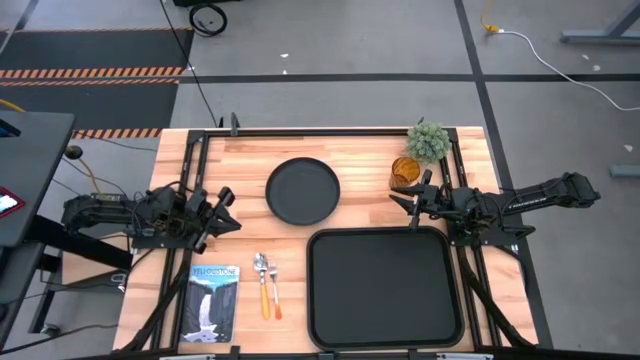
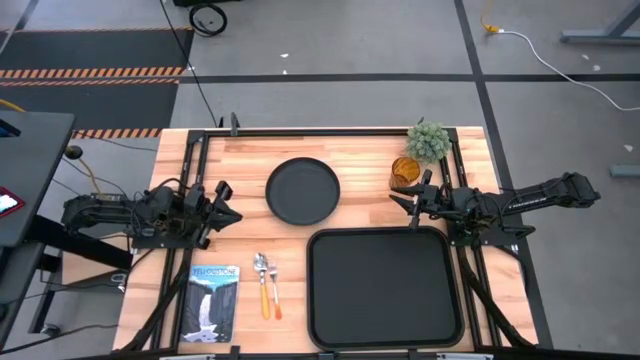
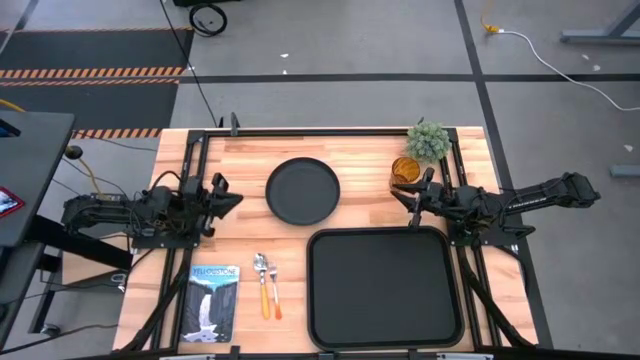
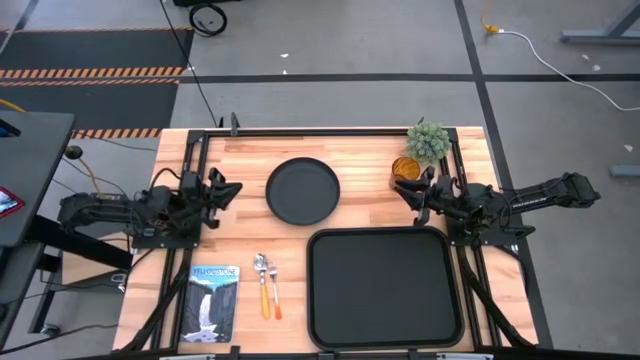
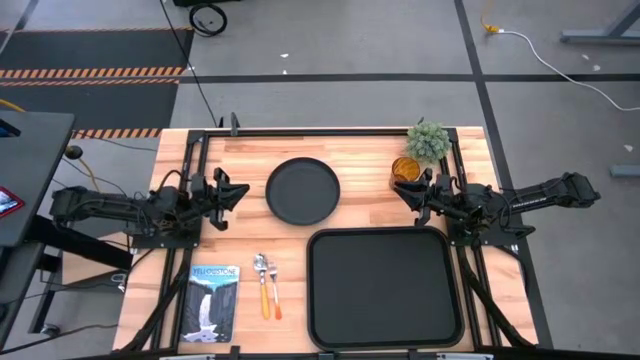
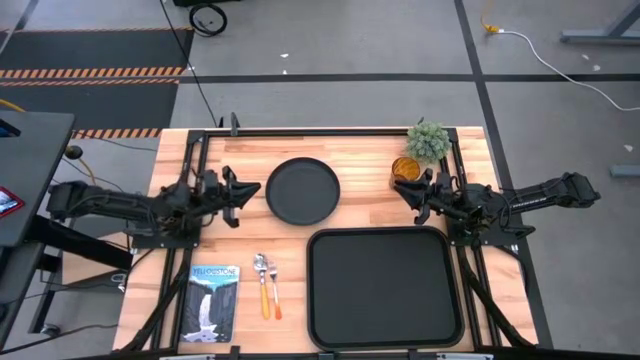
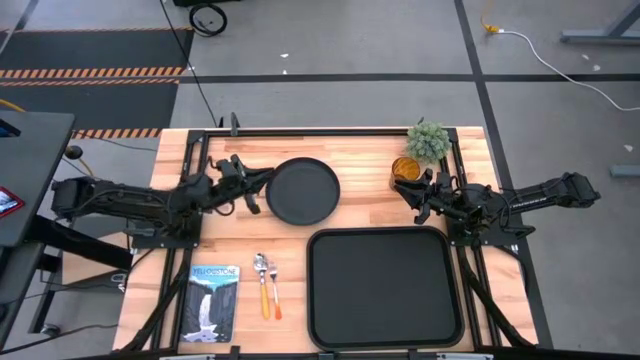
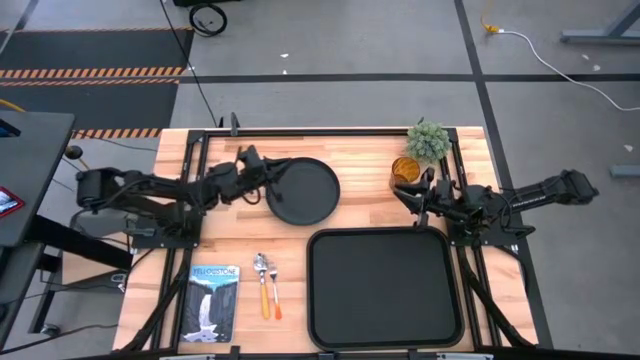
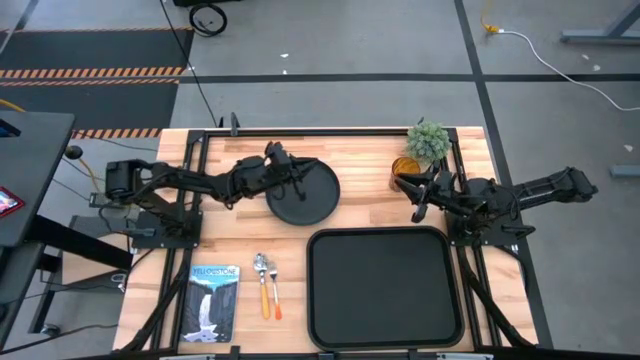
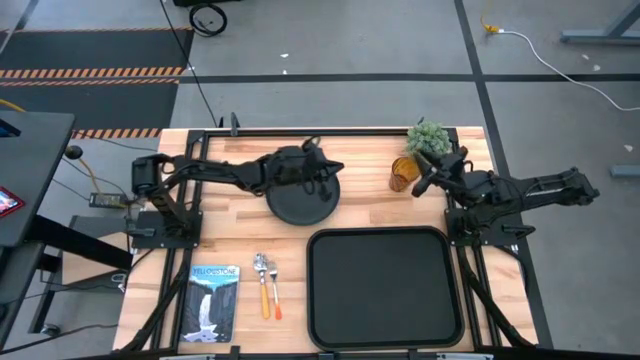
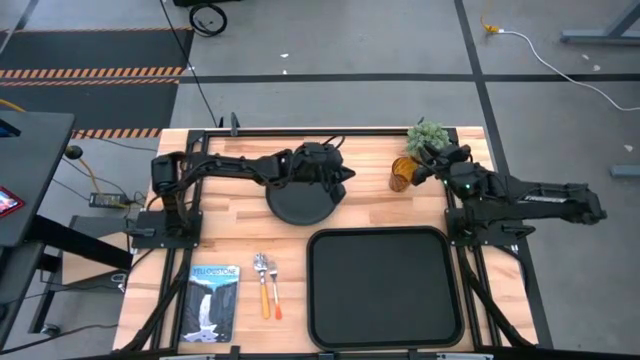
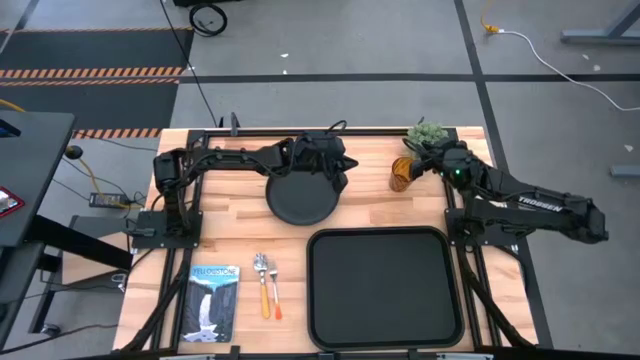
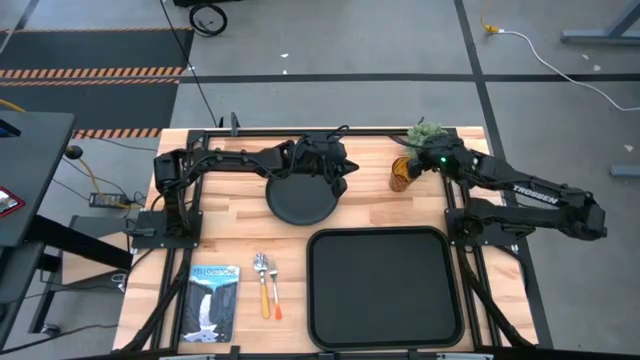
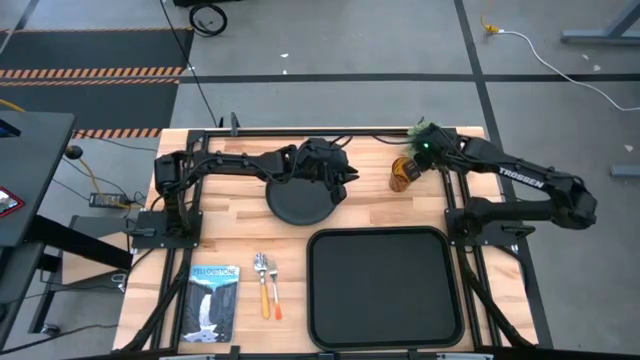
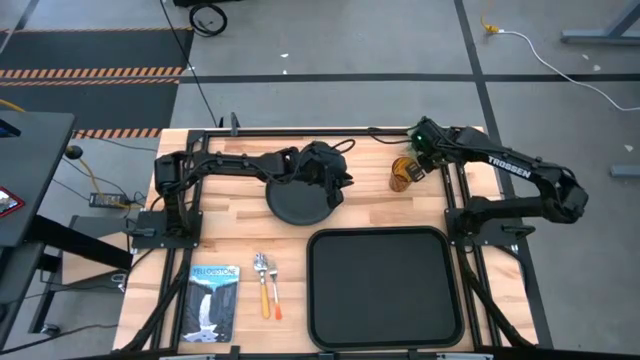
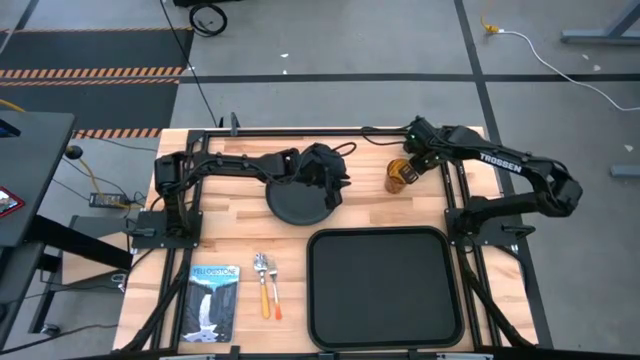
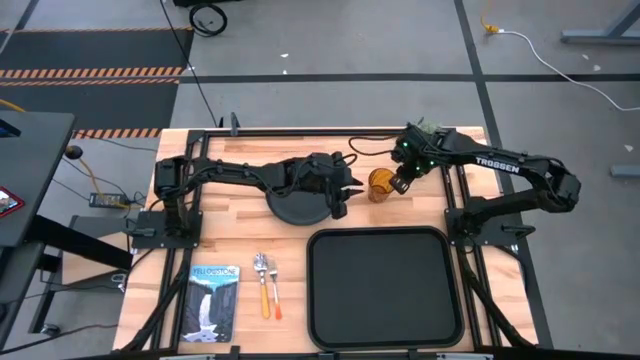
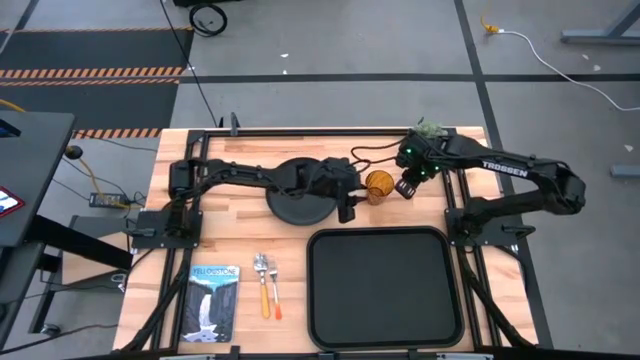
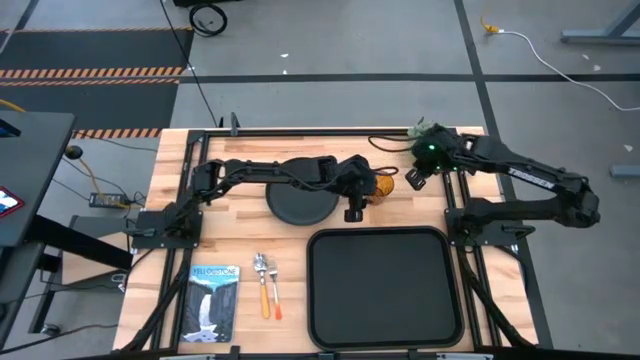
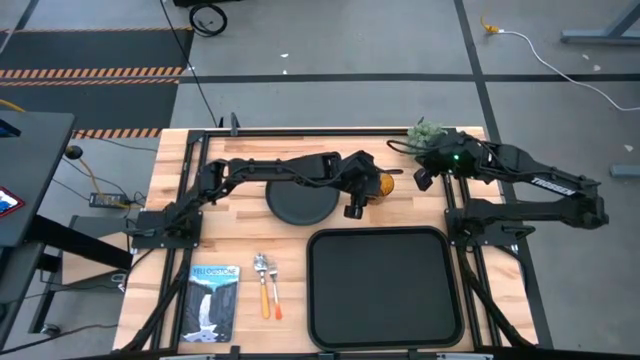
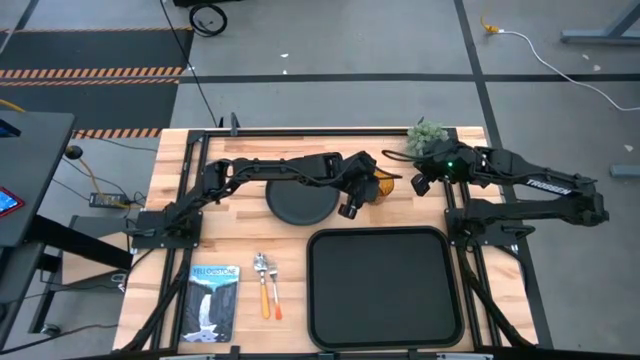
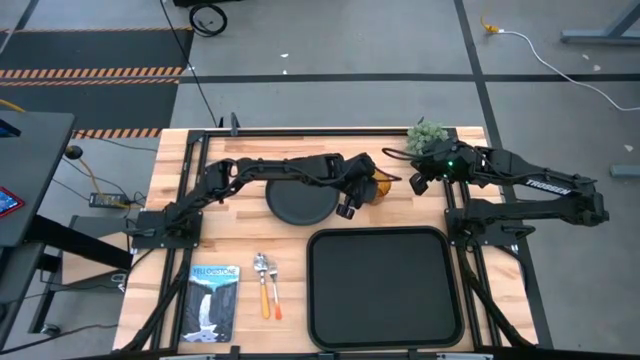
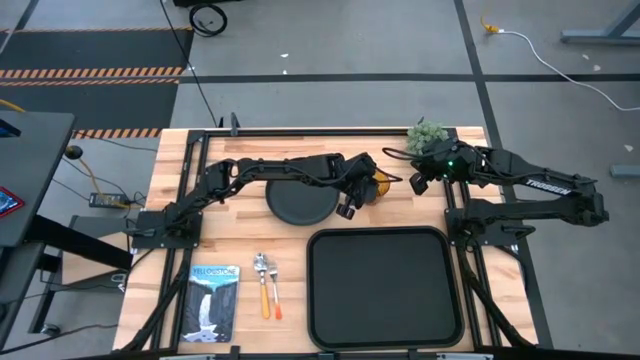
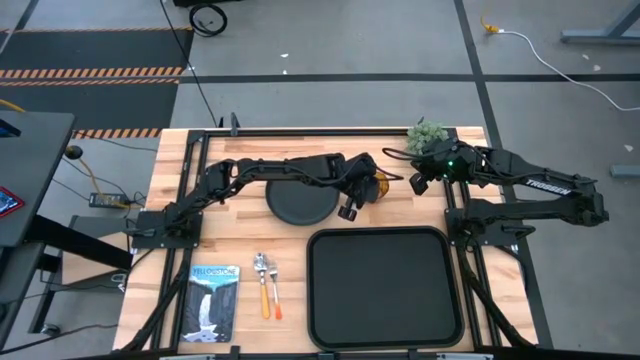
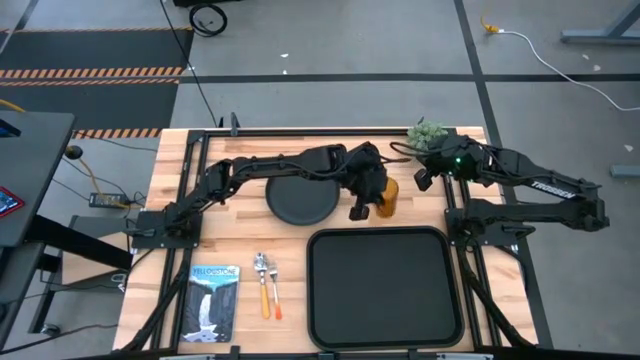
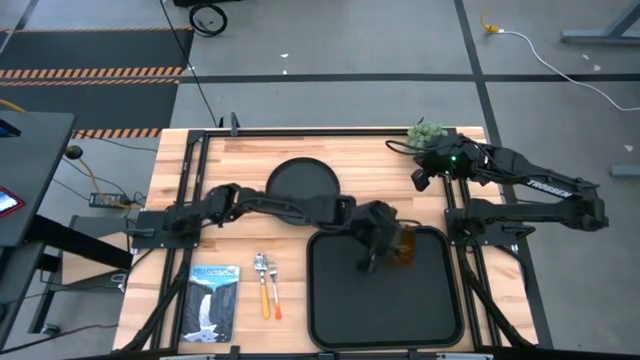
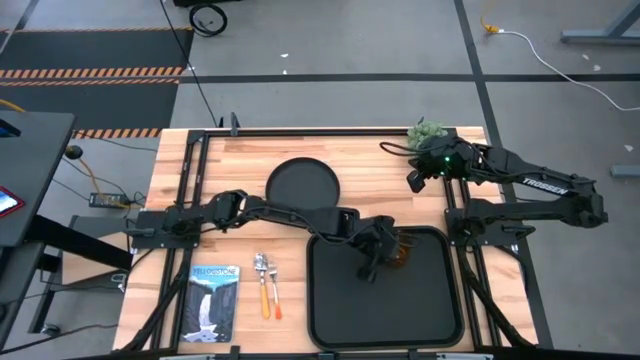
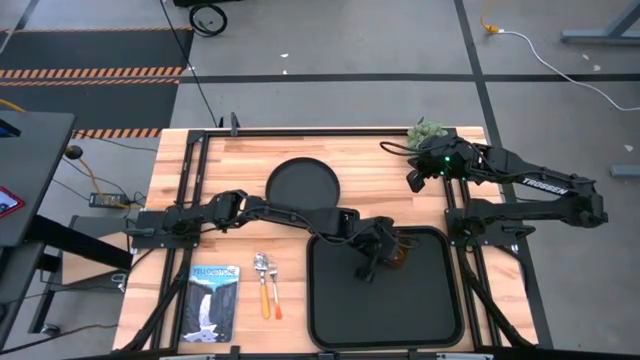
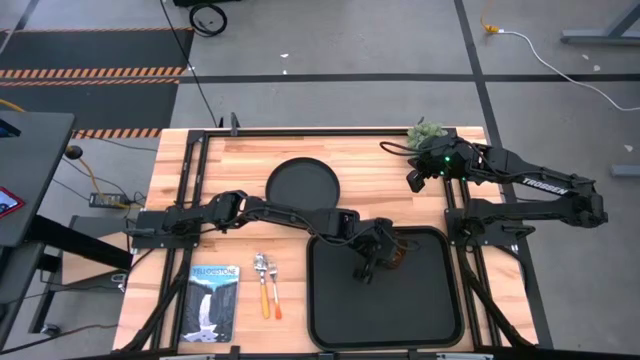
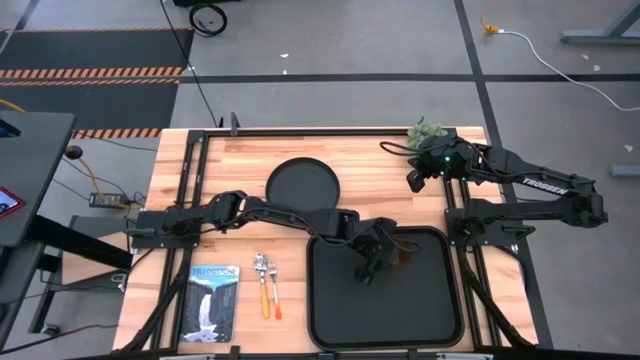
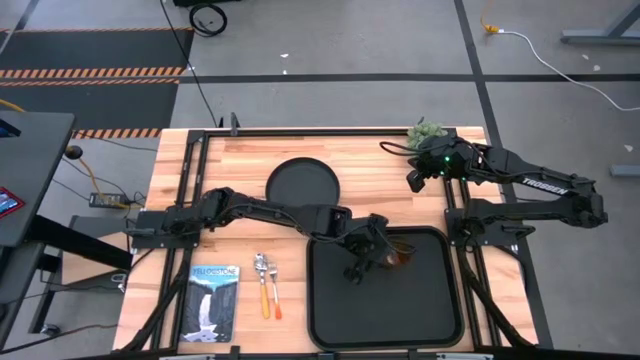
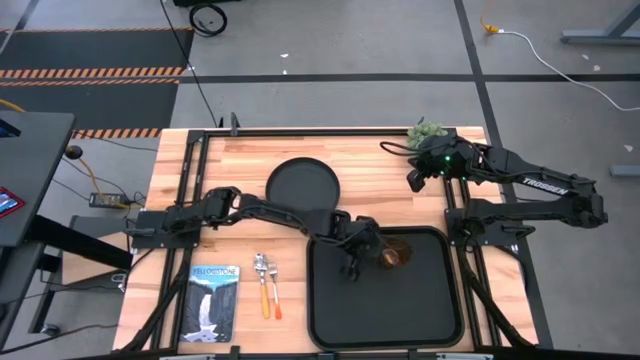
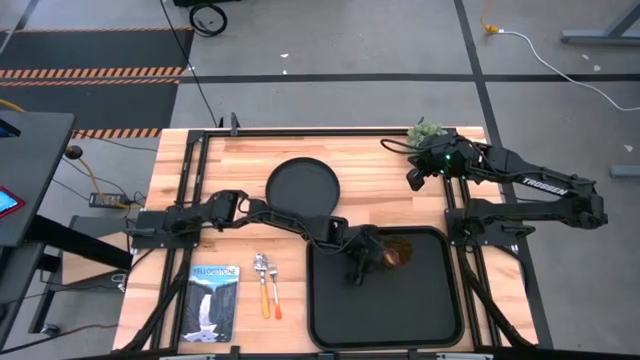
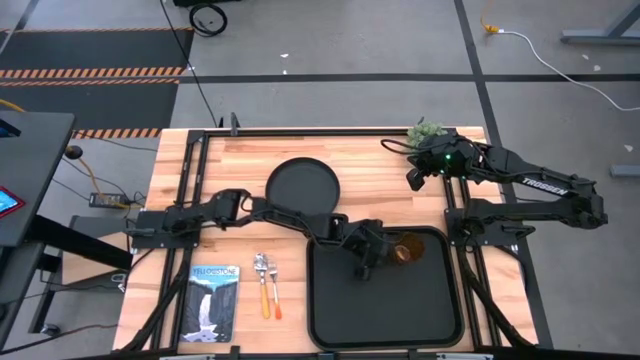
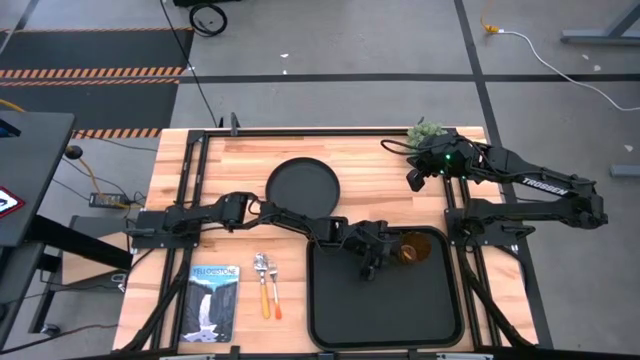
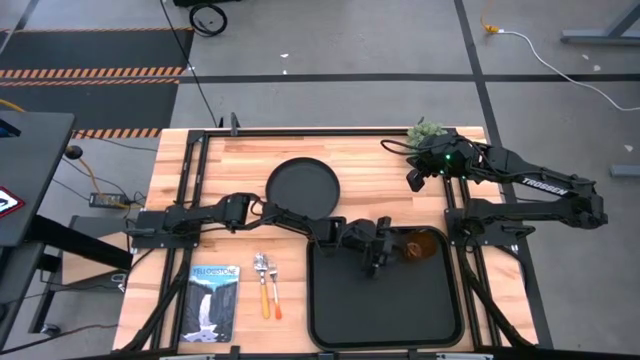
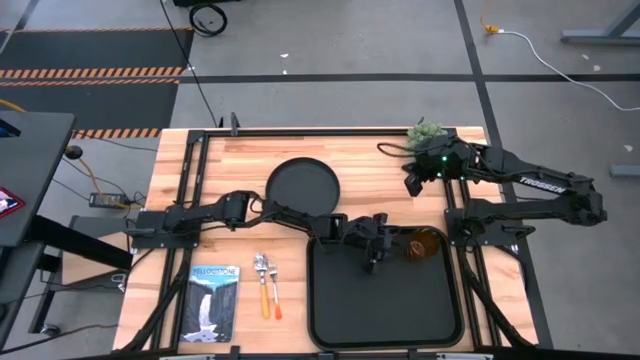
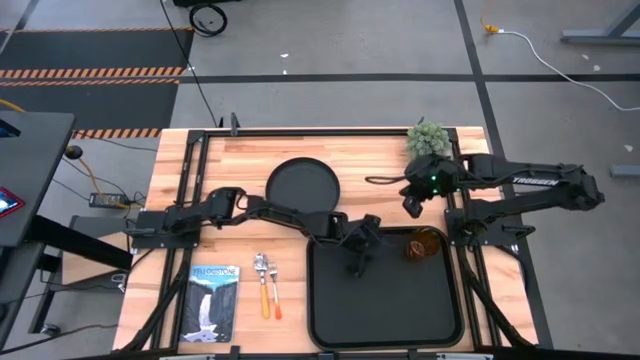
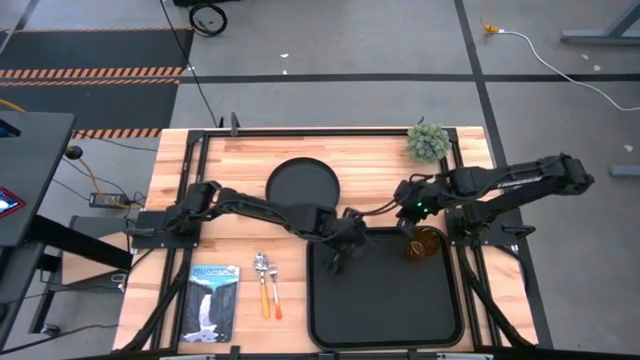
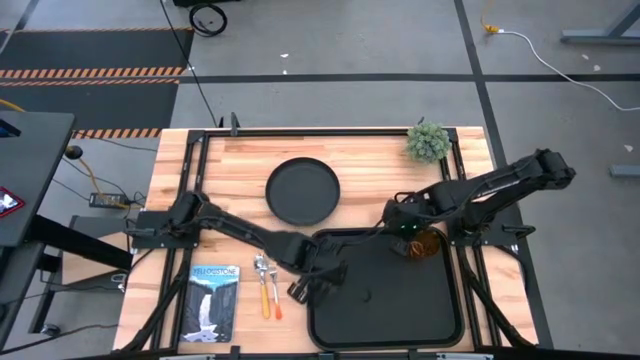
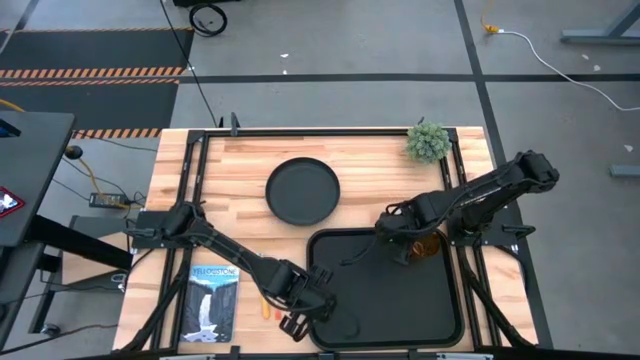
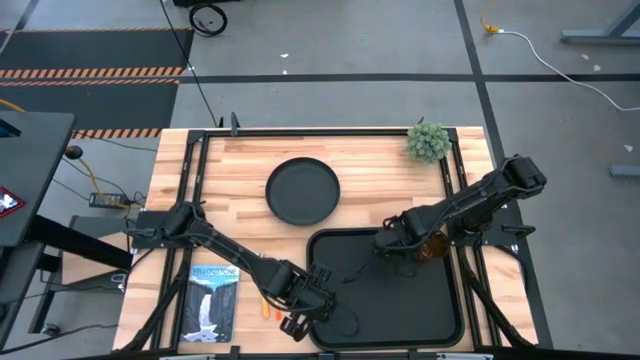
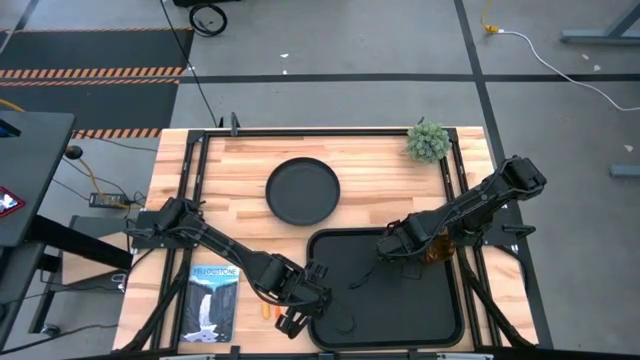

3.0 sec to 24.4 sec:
Task: Pick and place plate/cup/fork/spoon on tray
Put the brown cup on the black tray
